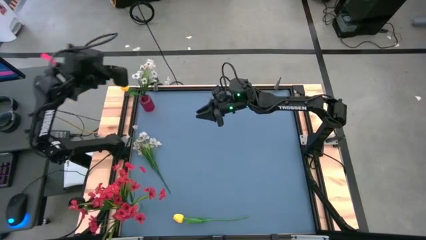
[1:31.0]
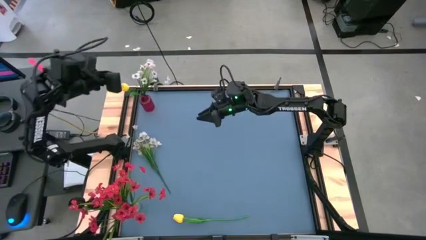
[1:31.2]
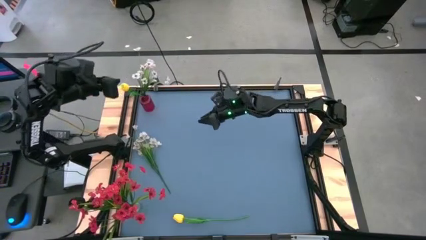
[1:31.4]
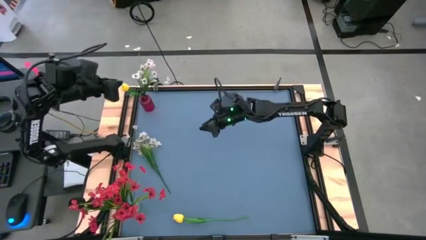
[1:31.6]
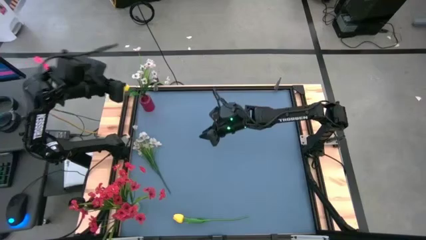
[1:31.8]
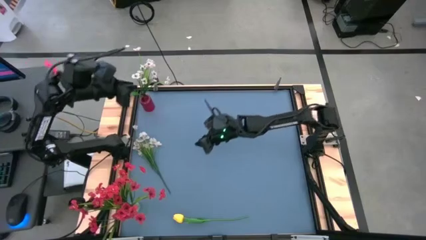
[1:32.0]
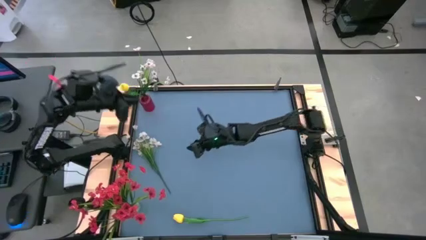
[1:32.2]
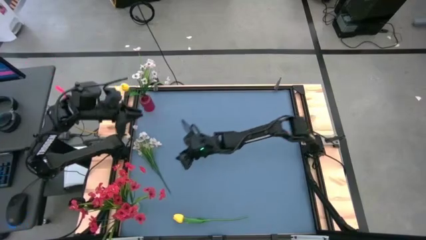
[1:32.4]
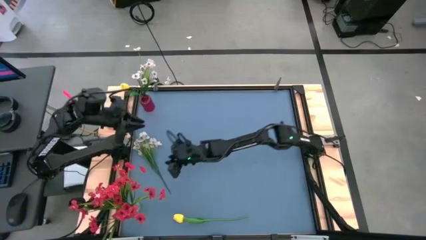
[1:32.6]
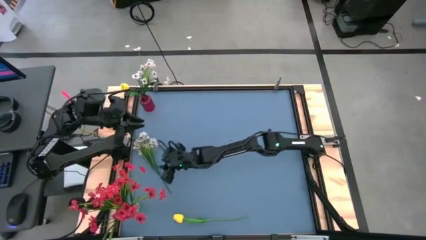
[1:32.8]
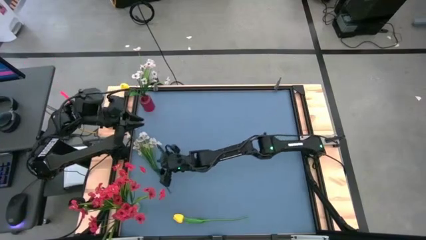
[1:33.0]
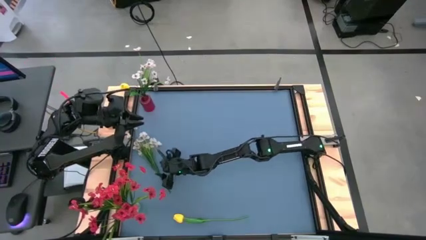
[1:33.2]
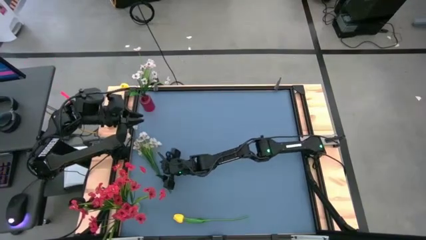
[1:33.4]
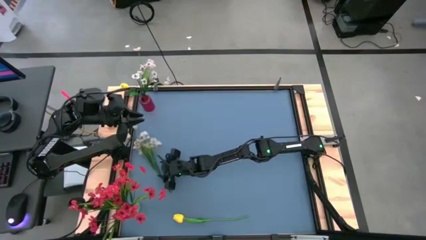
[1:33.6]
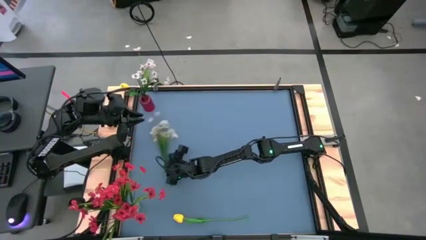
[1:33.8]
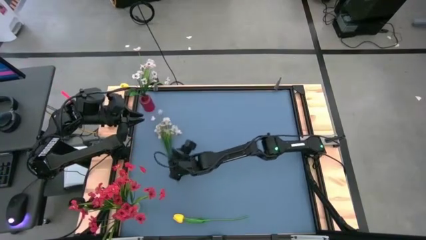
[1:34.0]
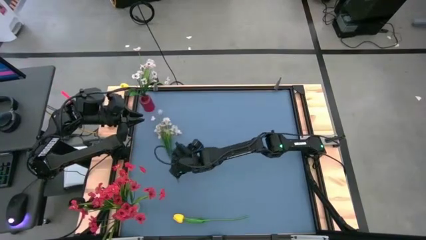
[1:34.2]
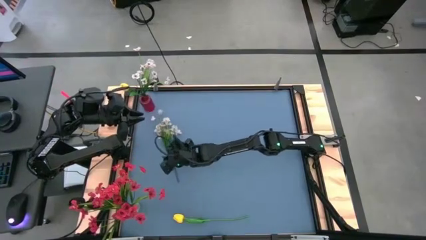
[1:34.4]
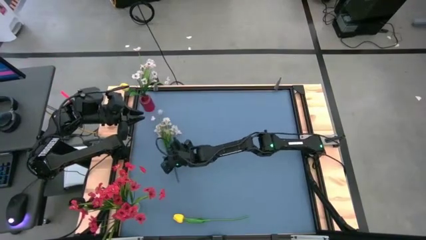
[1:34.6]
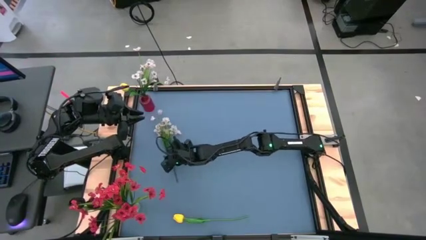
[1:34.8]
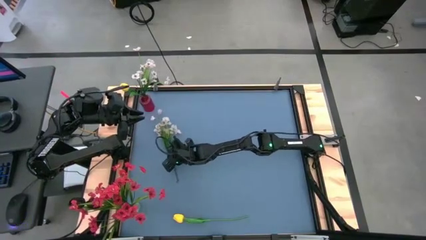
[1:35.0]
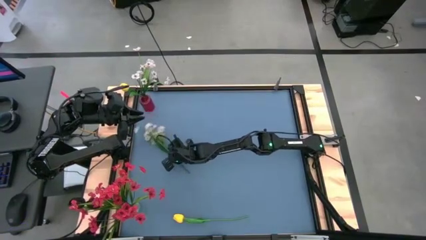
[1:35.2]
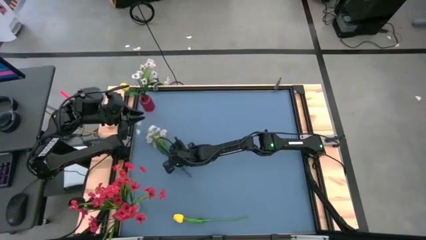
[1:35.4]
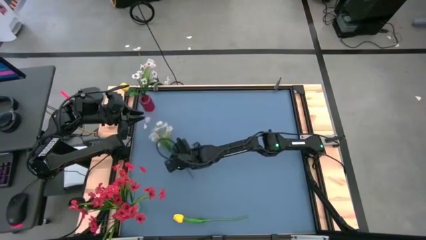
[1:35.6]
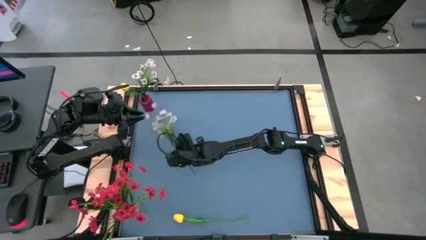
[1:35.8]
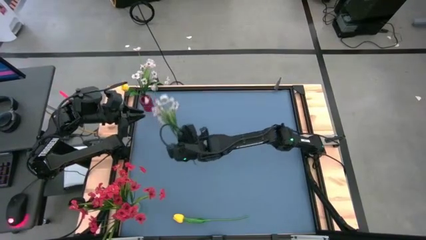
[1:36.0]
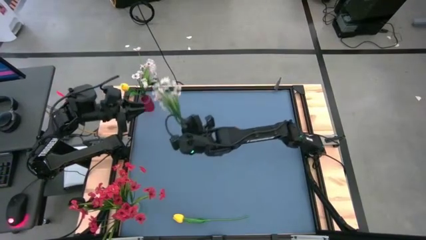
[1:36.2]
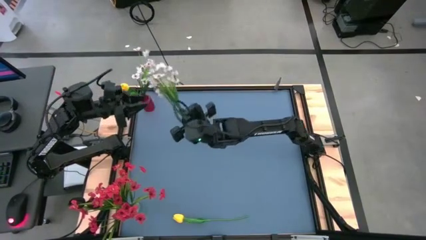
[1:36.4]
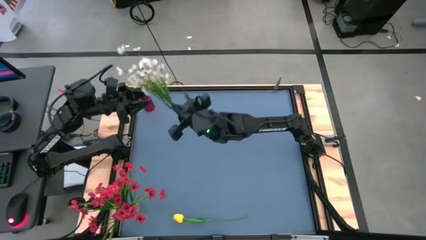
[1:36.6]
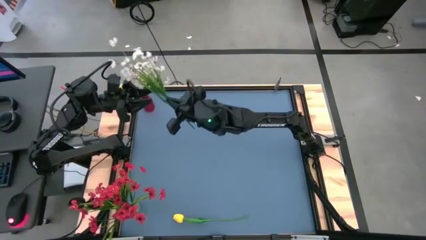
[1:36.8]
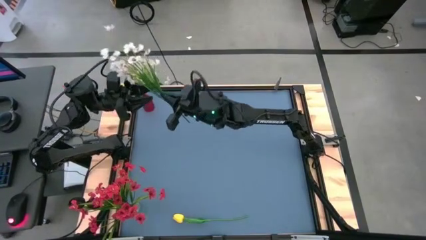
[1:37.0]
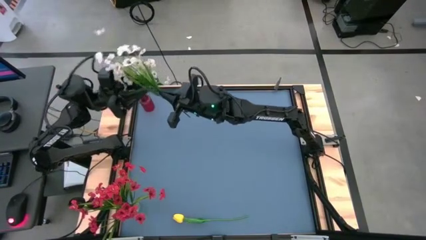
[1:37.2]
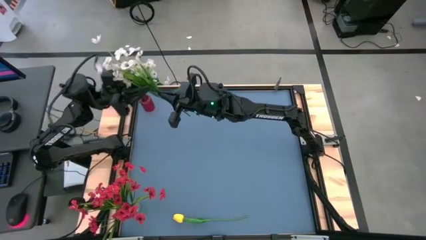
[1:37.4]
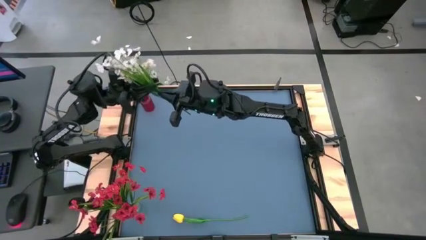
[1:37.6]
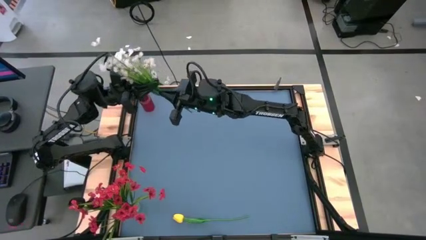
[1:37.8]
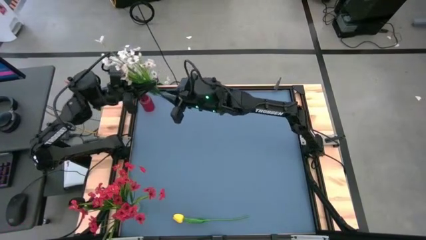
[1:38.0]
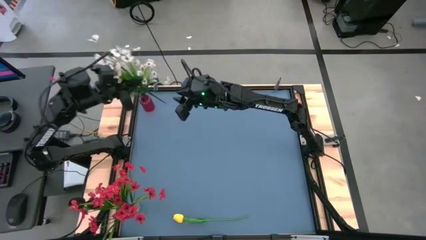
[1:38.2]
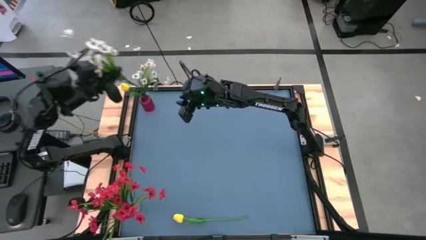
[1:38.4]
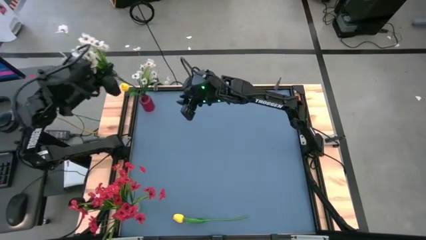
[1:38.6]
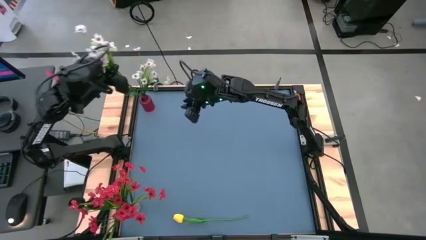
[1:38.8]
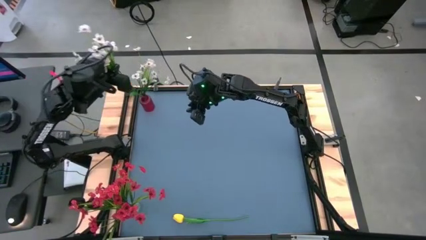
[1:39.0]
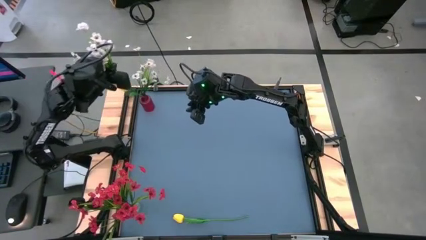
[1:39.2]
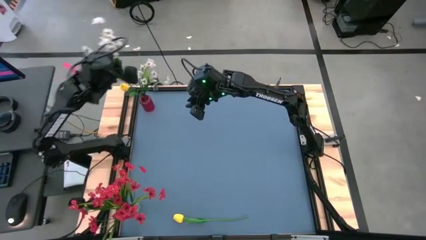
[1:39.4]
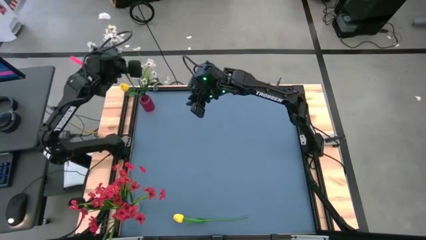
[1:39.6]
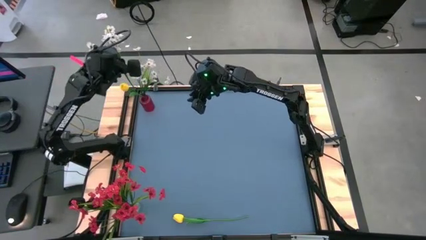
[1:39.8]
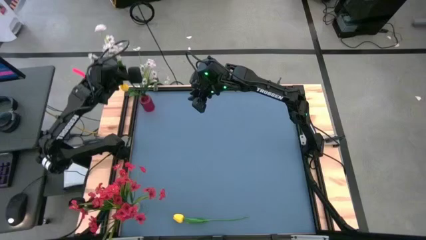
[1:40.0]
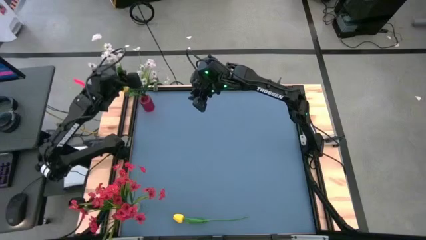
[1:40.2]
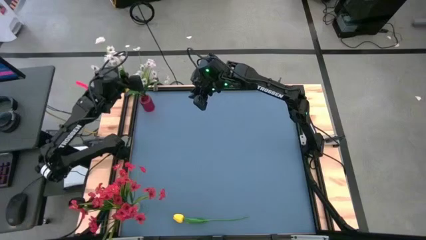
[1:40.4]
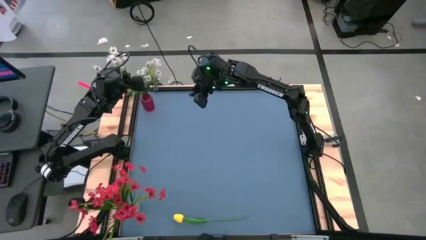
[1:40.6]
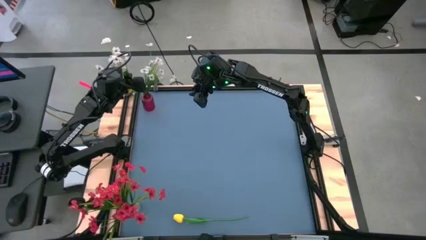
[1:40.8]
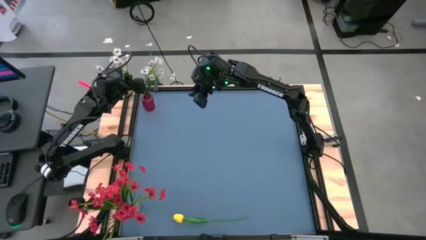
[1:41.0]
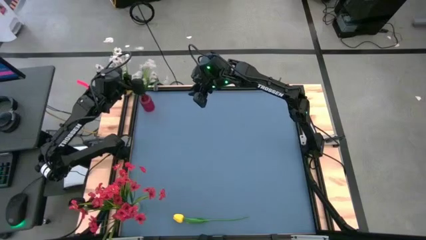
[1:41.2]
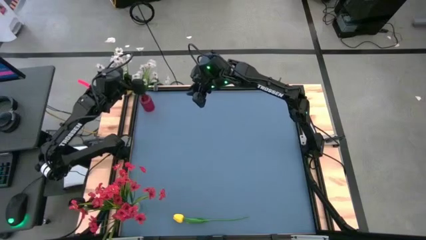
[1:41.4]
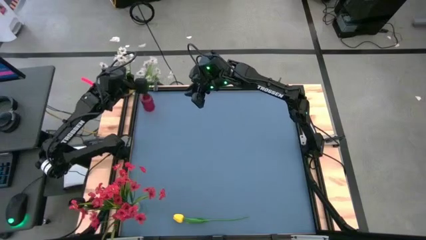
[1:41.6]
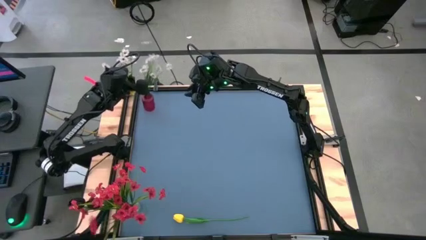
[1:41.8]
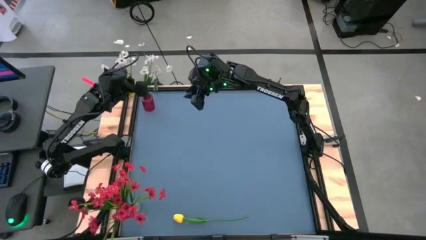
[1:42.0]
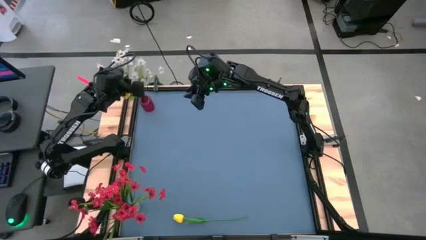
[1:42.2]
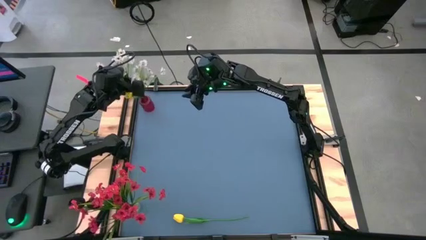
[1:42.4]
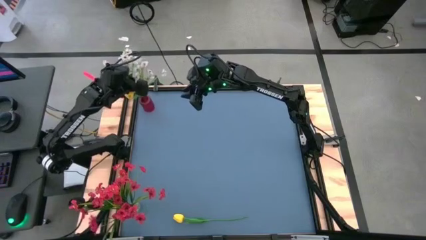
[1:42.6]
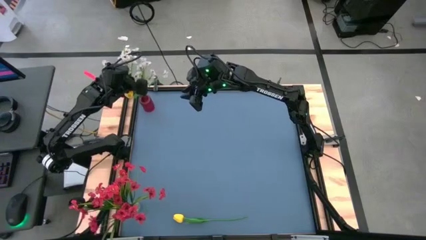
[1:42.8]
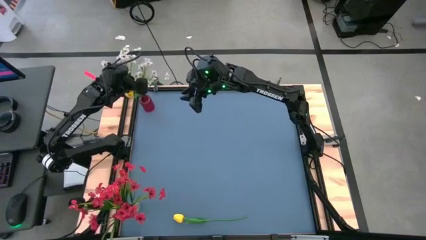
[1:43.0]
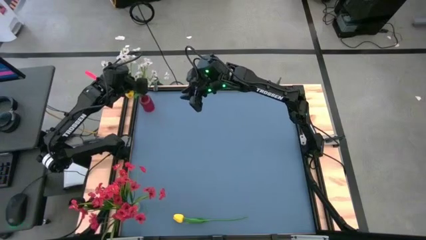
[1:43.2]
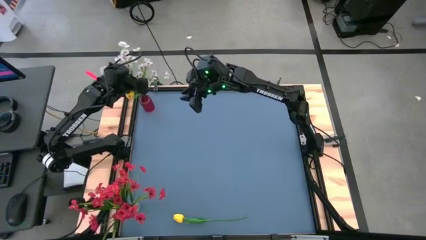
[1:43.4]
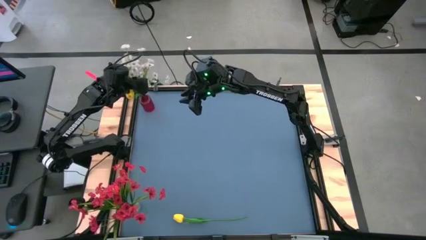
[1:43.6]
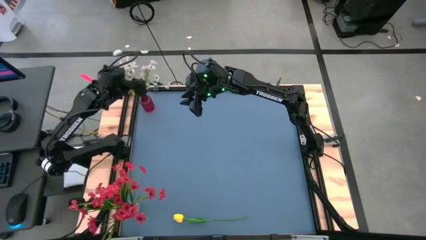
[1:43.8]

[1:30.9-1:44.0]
Task: Sort flowers into vase by color
Put the white flowers into the pink vase
